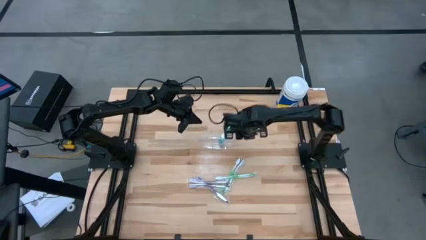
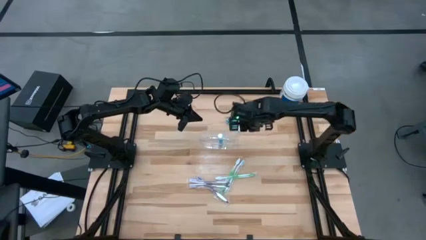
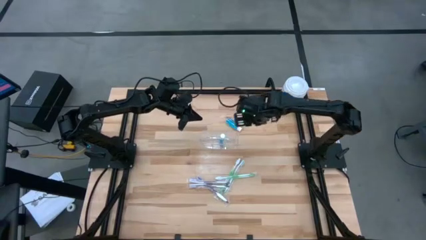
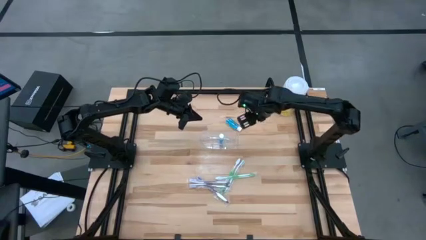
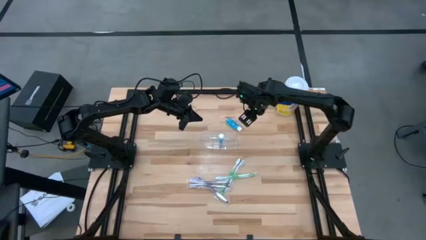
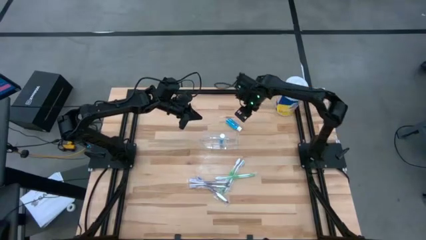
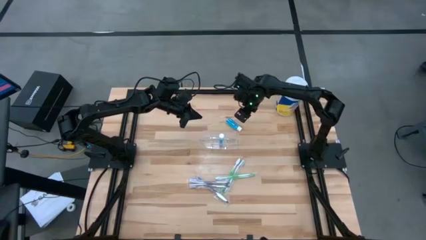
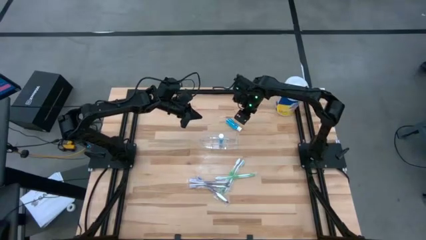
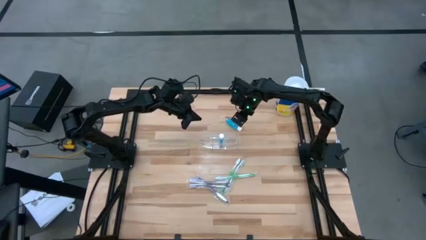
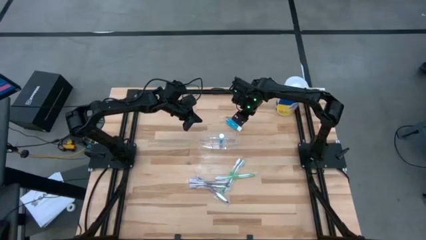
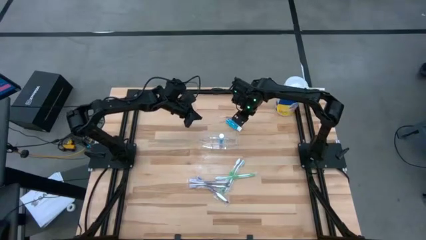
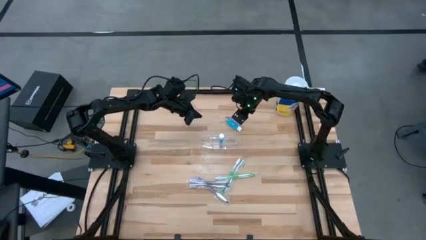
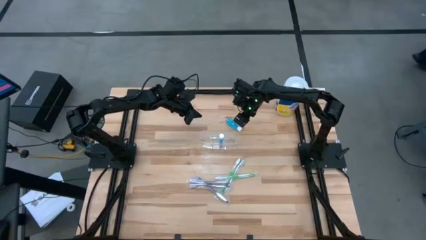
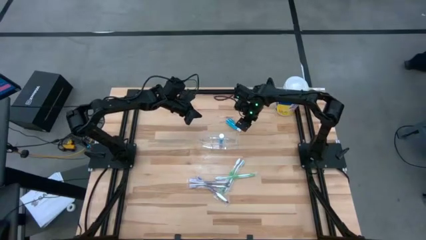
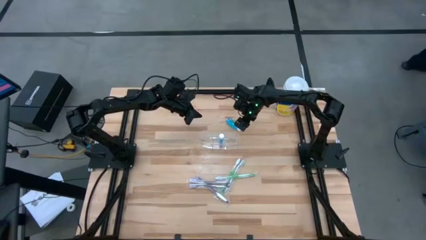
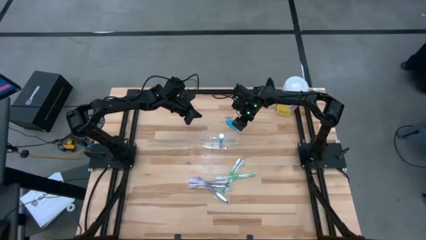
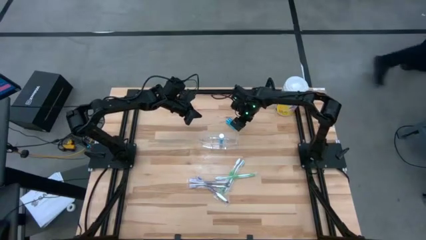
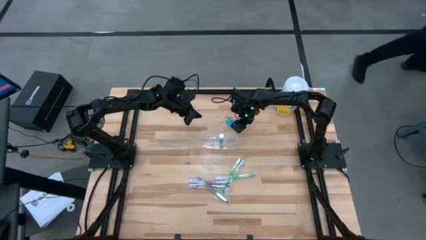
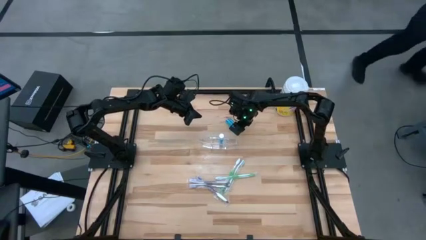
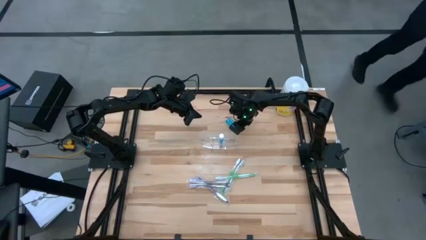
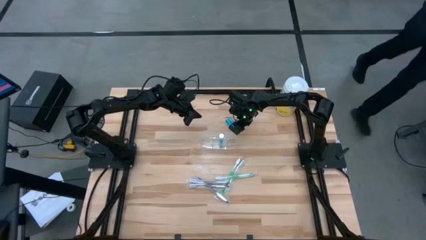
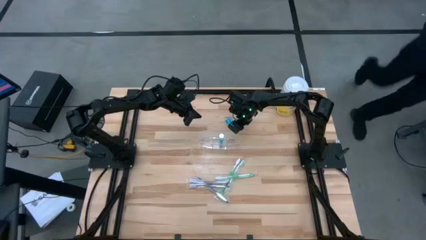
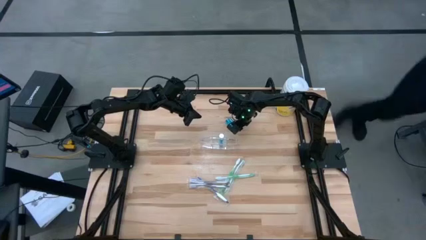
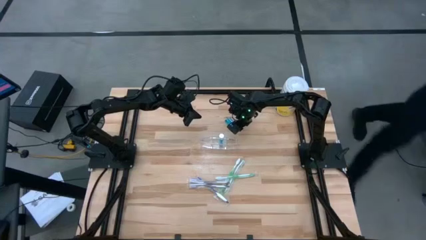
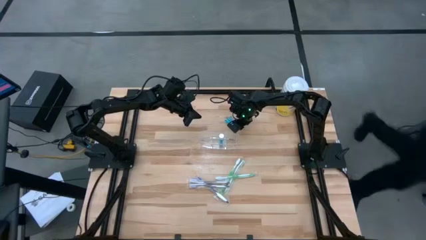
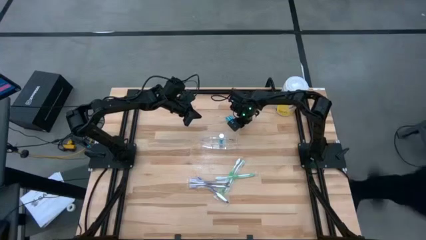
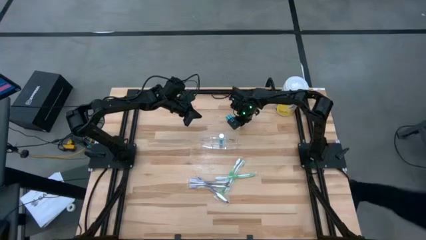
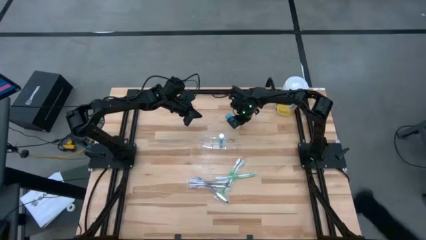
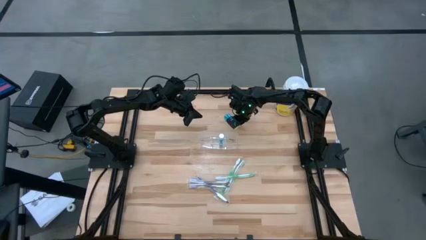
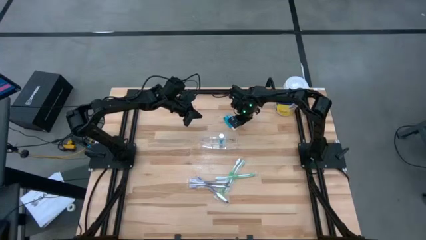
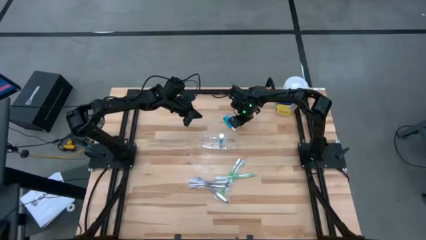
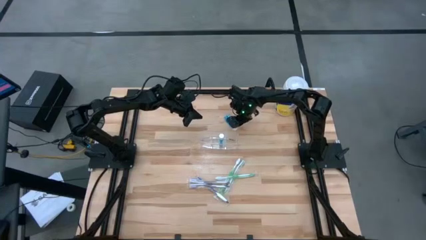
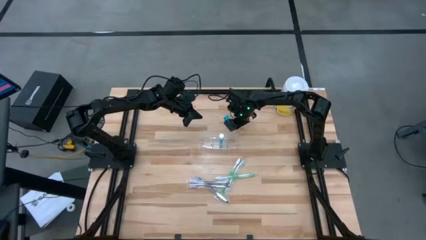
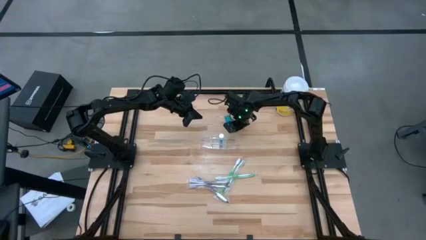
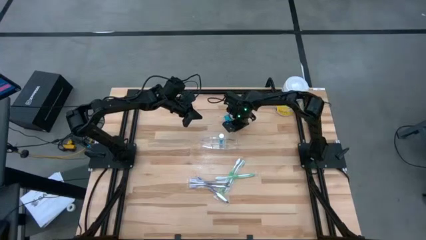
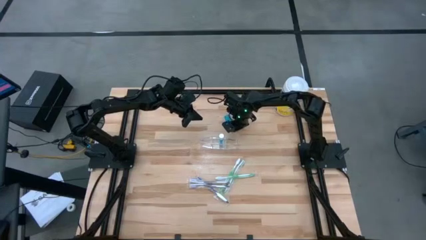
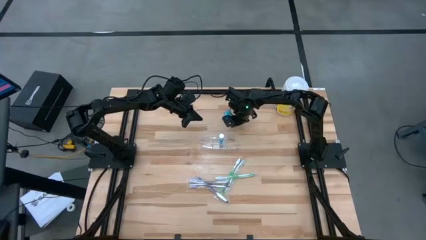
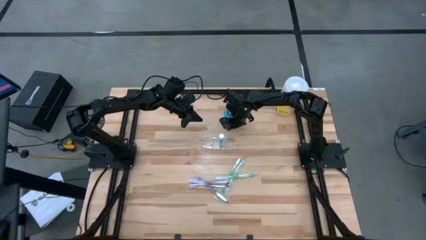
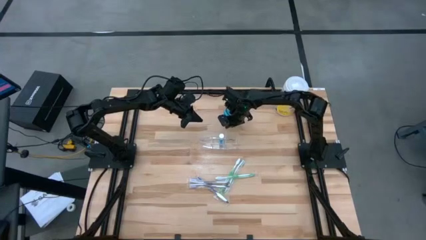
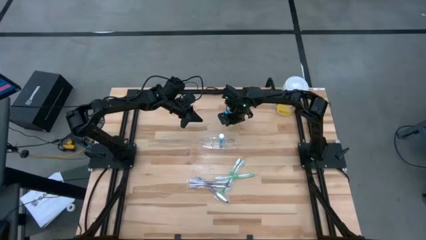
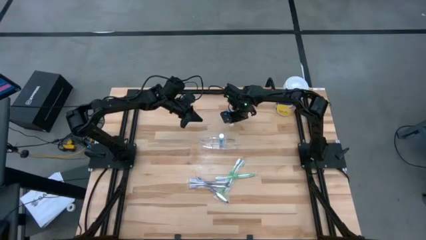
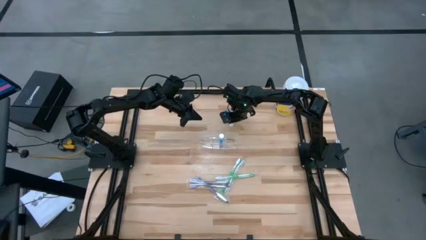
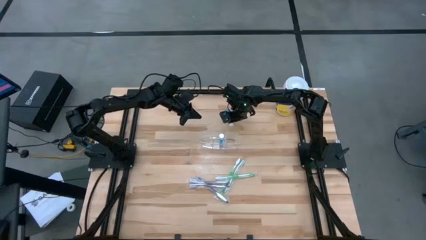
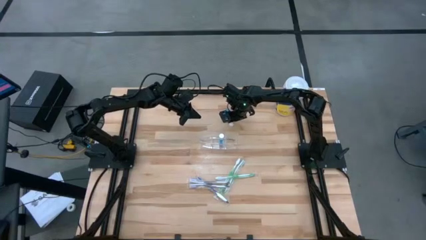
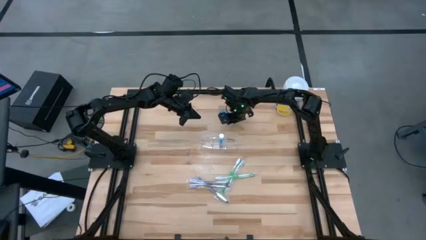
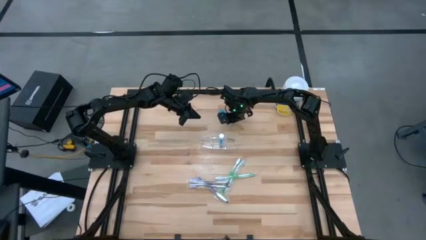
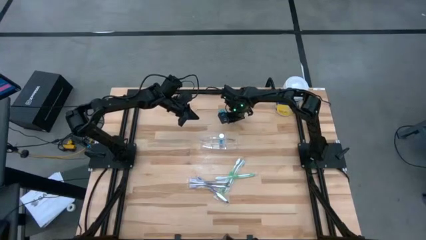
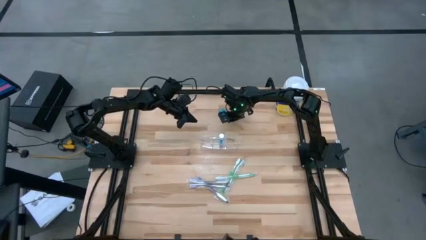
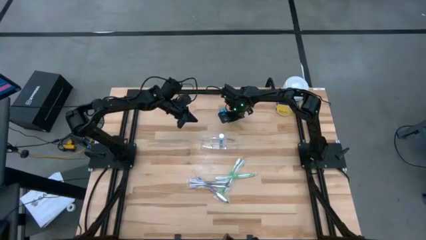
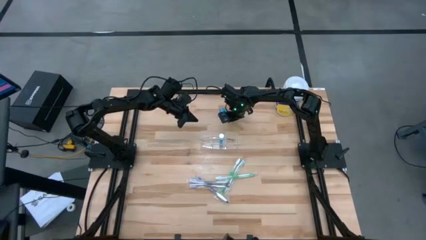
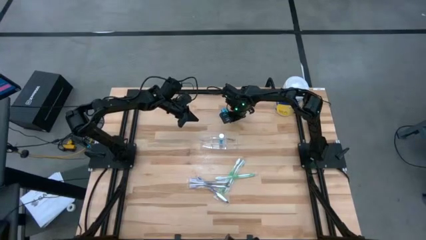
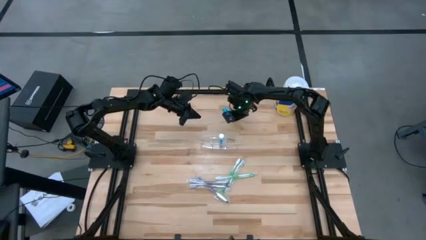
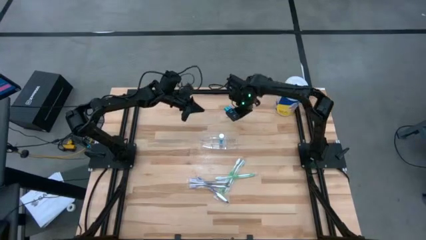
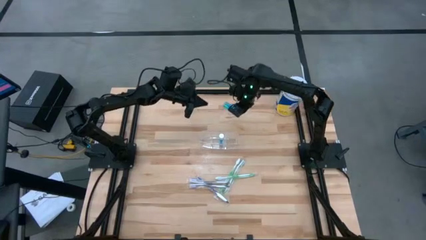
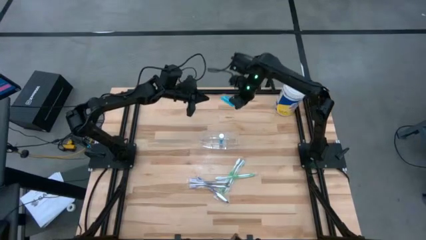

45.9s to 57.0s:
Task: Pick & Place toothbrushing station
Put the blue mouthwash bottle into the transparent organizer
